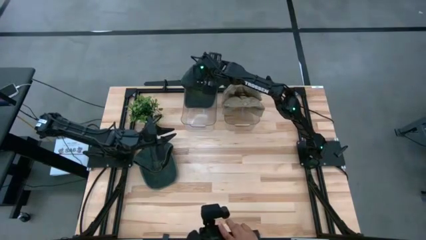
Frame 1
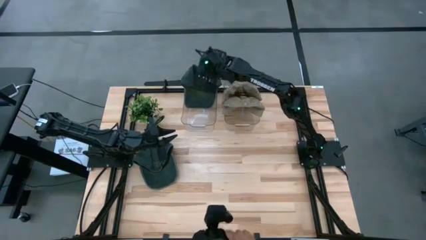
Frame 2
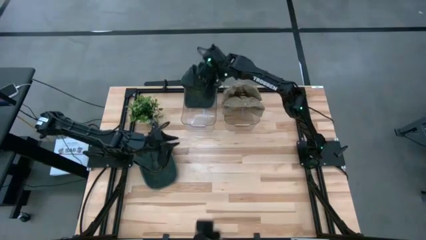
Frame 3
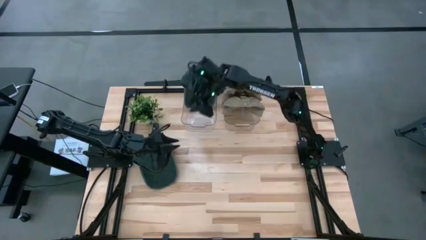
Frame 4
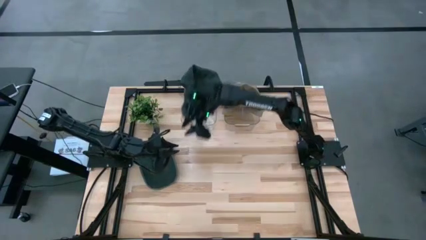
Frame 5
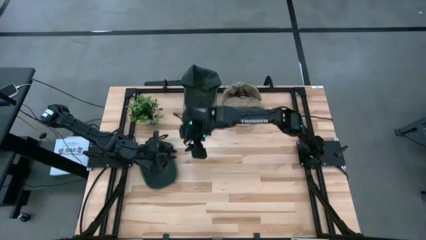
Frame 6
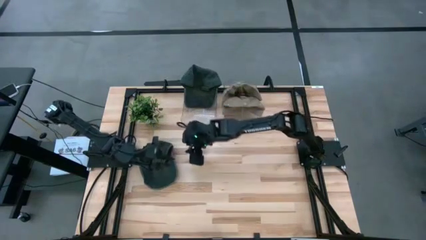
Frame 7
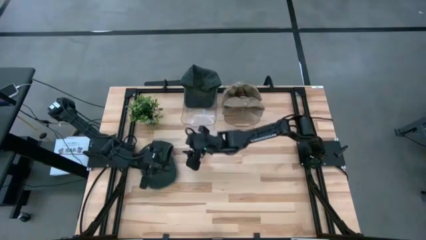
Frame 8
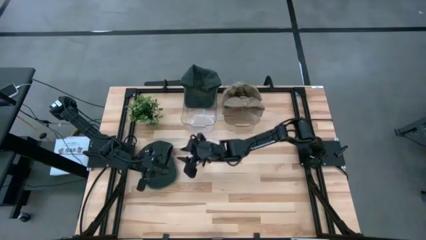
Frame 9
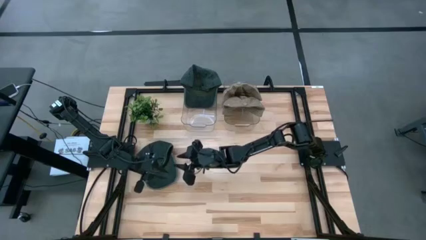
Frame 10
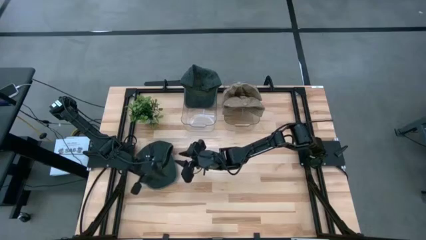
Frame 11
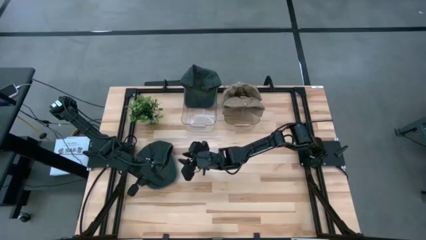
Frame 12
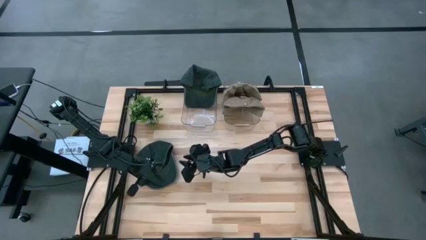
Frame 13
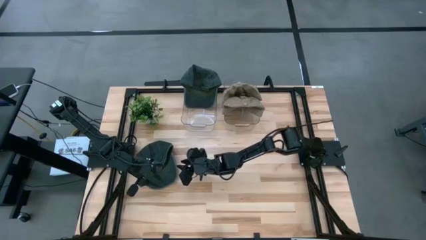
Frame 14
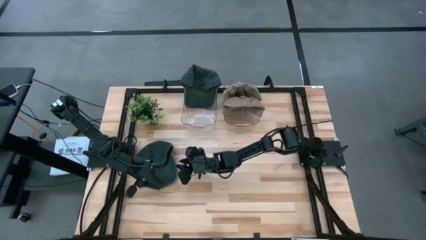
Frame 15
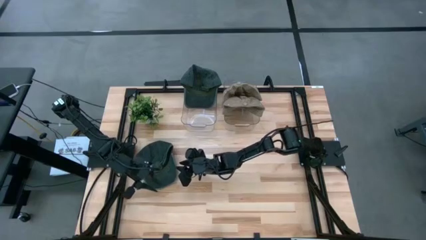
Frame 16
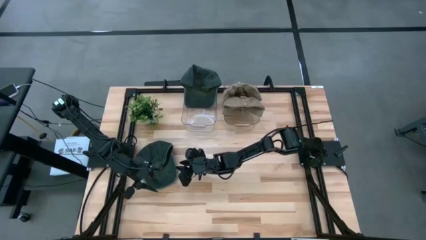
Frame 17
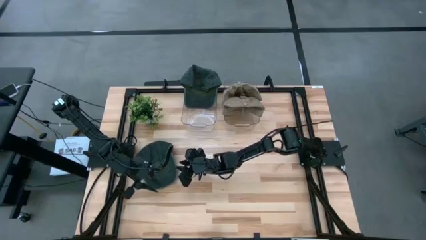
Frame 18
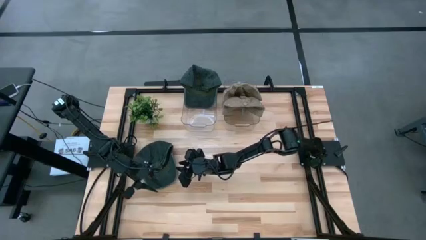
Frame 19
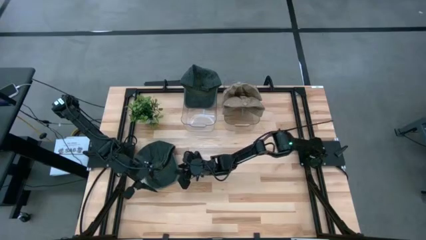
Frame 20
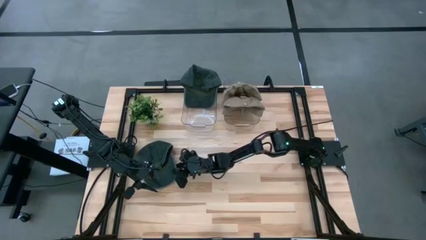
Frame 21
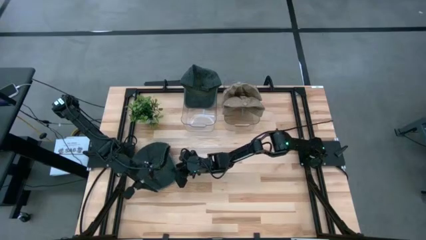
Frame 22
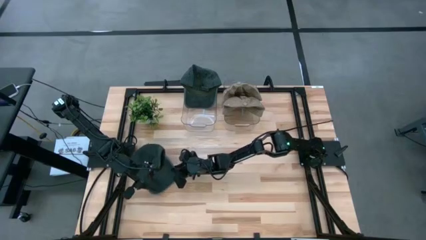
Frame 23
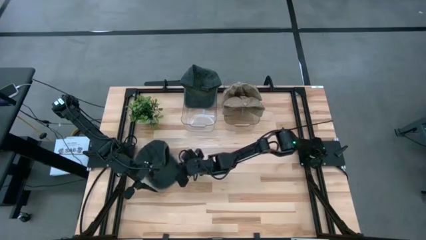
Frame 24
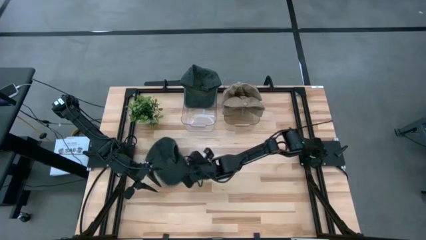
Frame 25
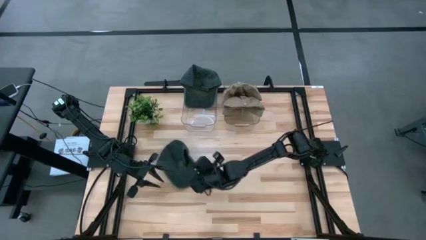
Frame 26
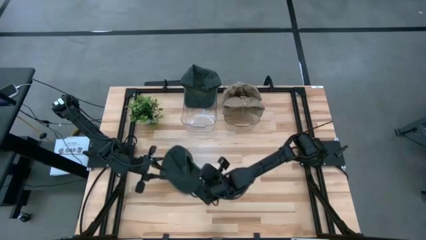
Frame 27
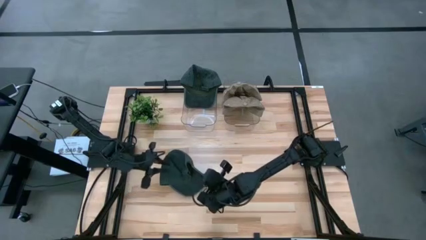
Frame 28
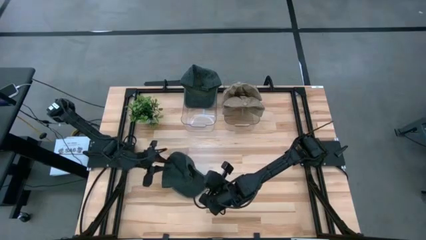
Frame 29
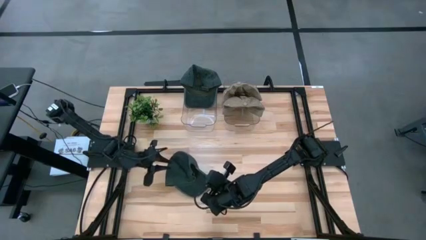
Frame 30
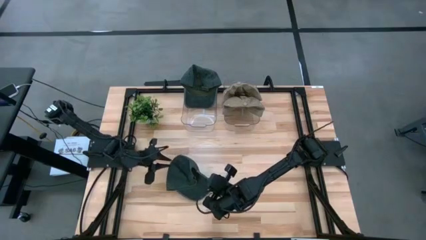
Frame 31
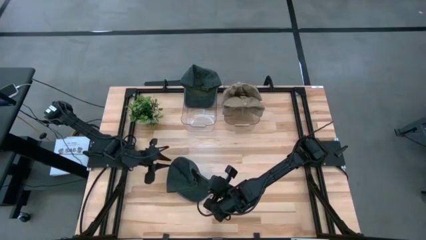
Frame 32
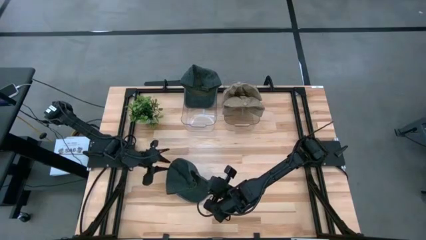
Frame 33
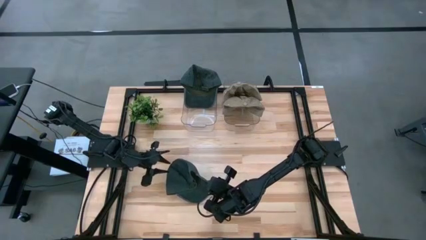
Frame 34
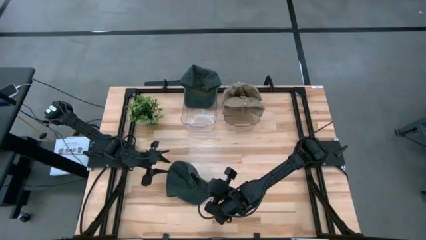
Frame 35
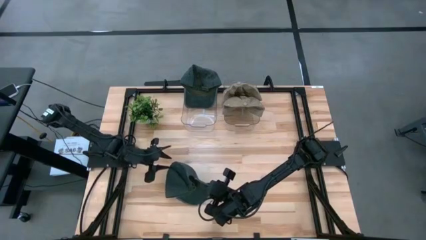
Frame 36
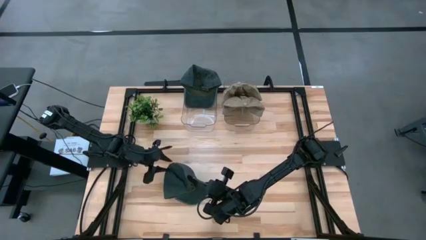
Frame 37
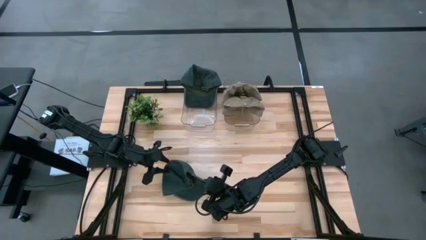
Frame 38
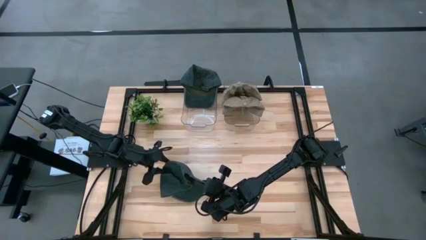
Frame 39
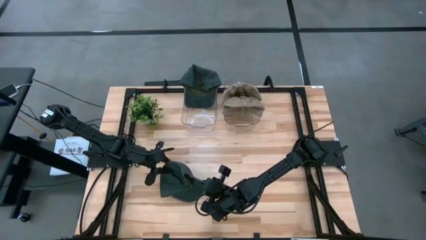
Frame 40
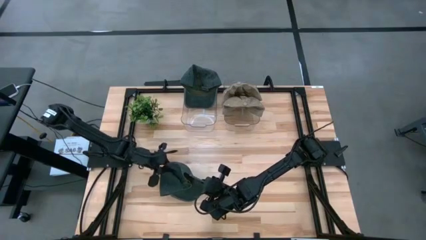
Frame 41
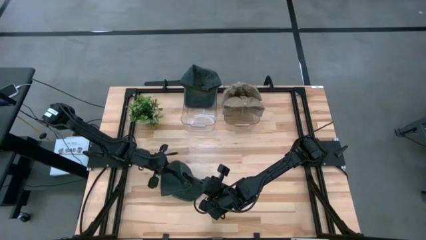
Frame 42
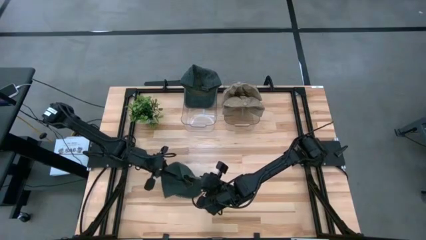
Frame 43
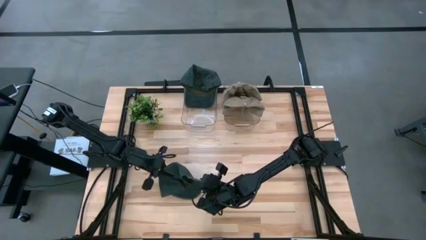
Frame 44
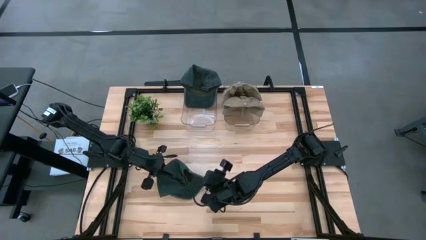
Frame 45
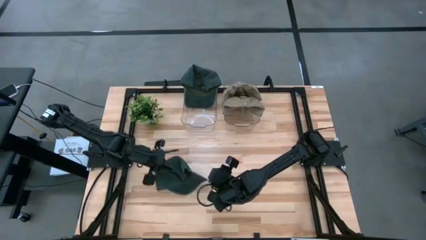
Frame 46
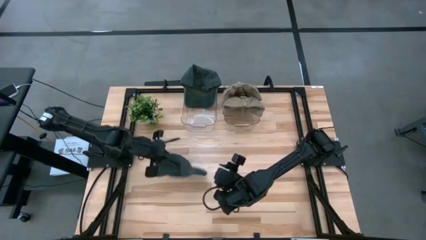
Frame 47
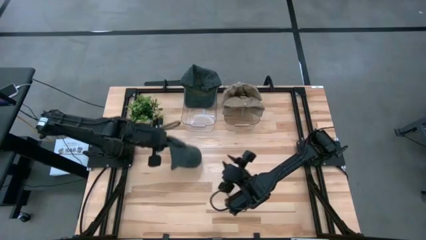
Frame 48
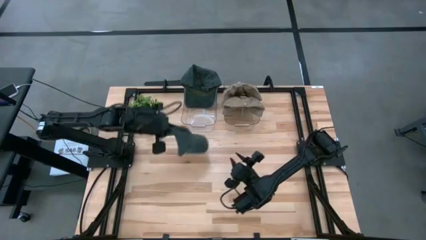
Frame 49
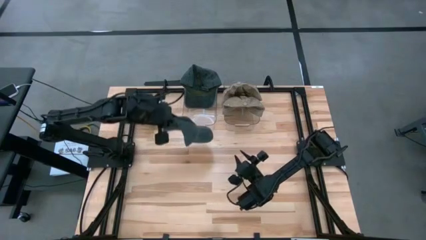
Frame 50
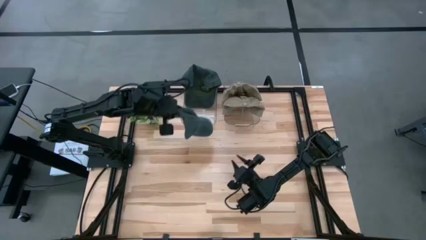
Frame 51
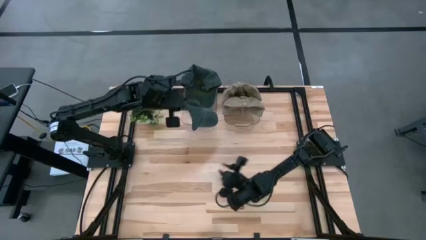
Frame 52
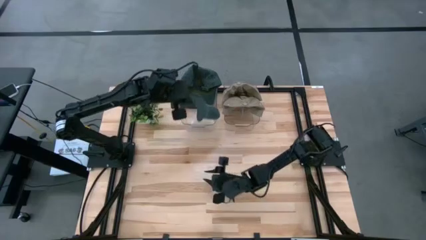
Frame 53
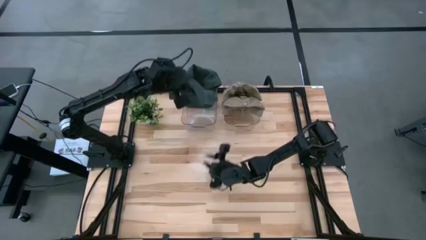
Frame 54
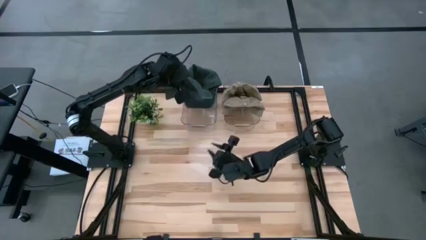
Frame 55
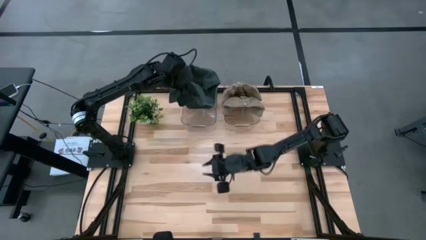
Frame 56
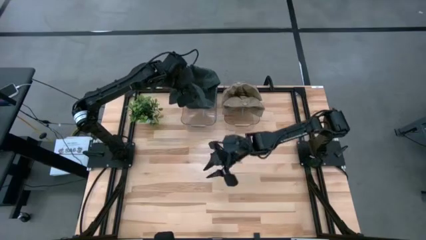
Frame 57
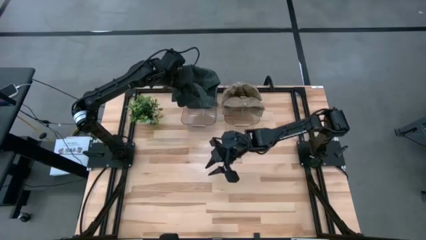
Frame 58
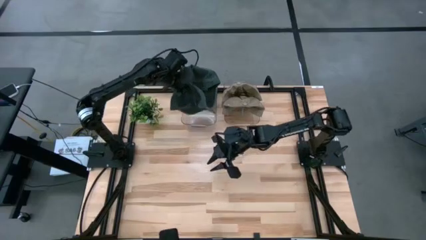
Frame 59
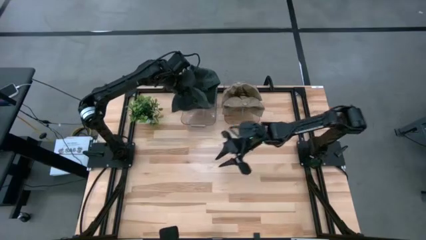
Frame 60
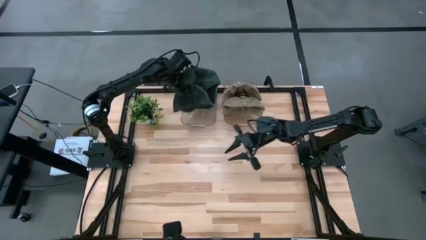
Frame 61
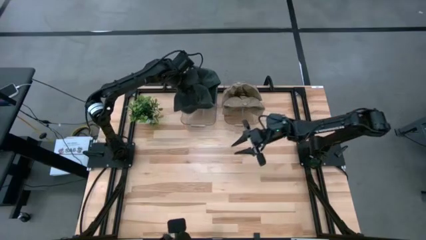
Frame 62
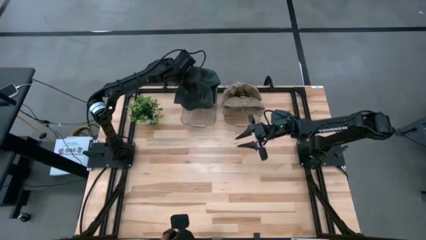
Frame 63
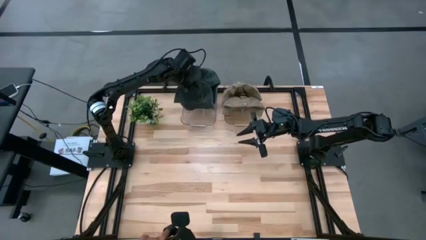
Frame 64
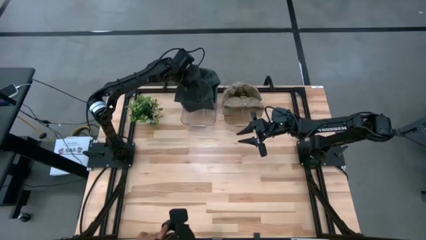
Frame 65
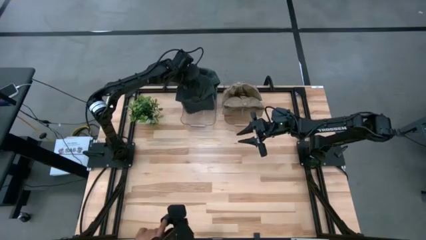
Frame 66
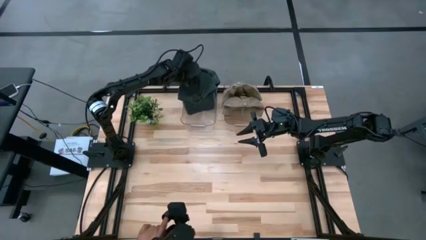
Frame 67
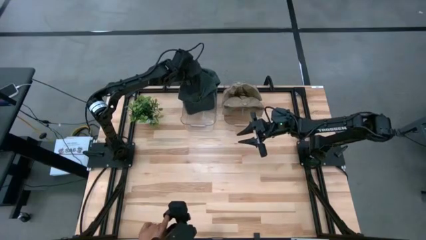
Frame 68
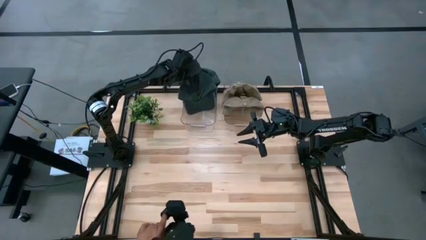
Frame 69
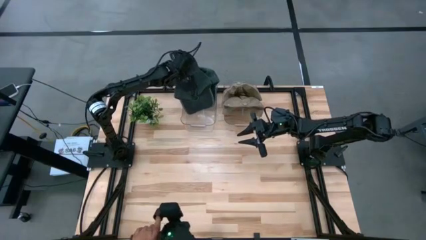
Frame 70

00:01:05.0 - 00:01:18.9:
Task: Pick & Place hat
Put the blue cap into the left transparent bin
